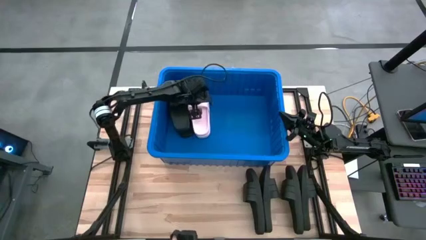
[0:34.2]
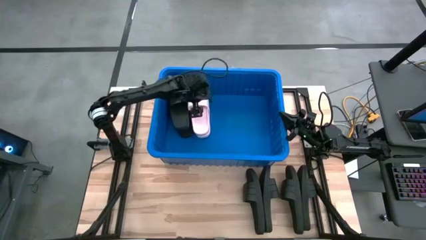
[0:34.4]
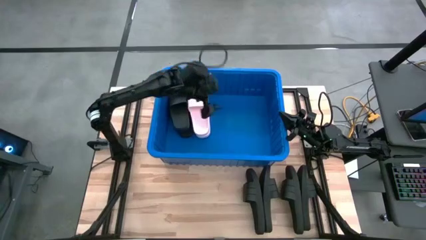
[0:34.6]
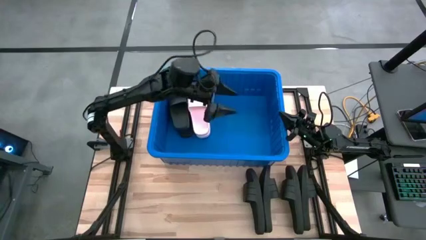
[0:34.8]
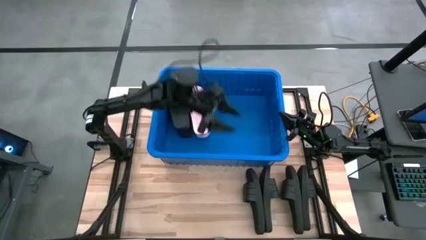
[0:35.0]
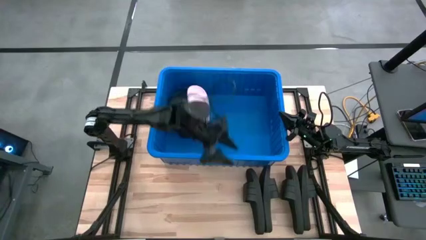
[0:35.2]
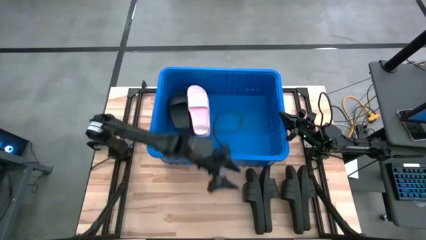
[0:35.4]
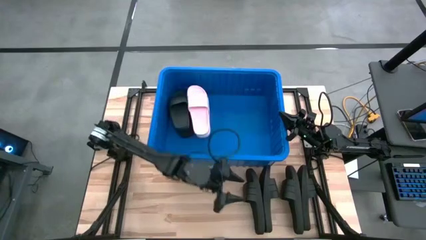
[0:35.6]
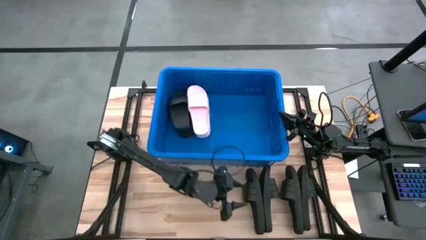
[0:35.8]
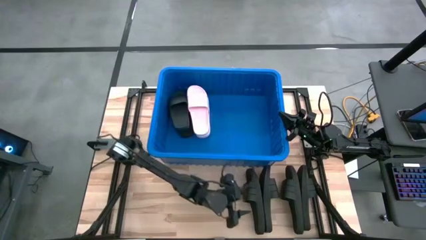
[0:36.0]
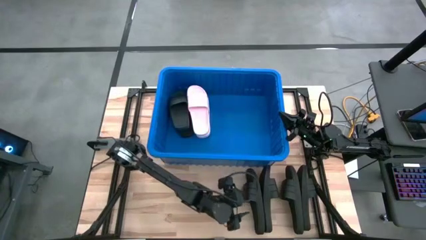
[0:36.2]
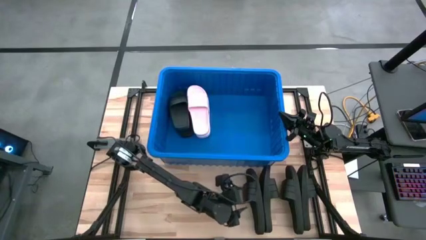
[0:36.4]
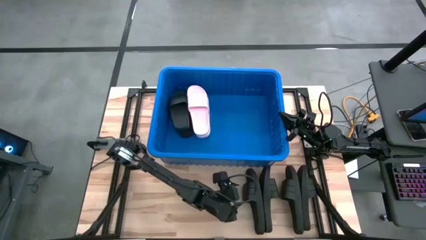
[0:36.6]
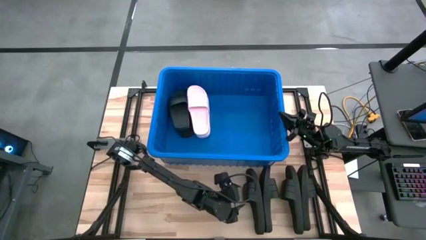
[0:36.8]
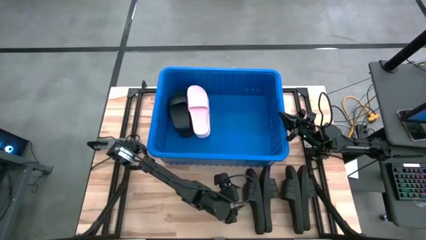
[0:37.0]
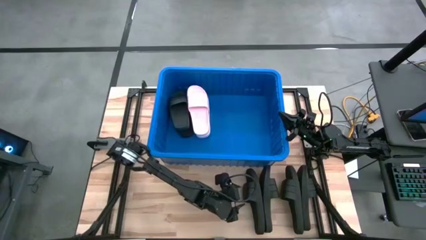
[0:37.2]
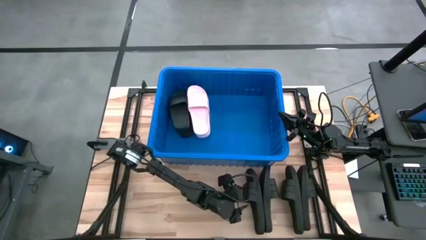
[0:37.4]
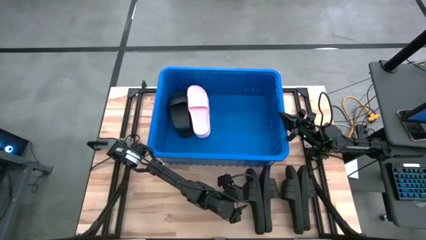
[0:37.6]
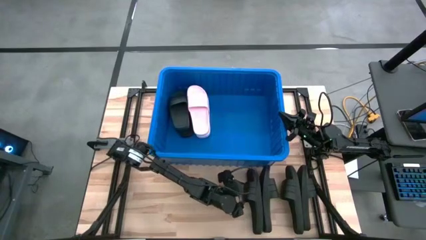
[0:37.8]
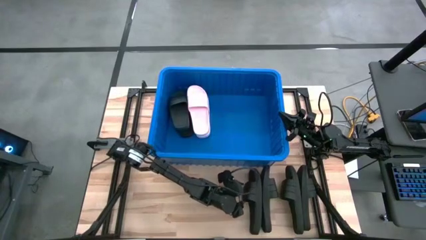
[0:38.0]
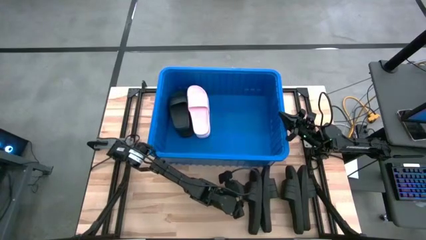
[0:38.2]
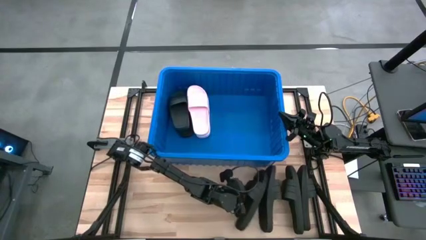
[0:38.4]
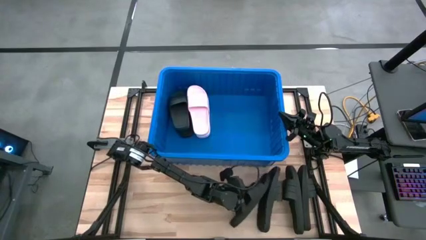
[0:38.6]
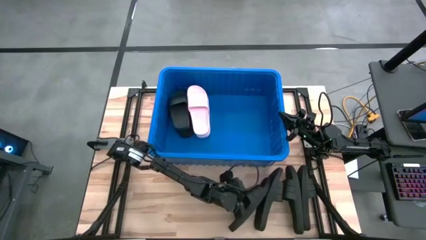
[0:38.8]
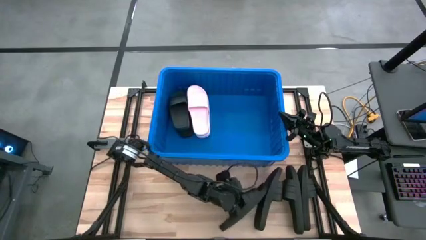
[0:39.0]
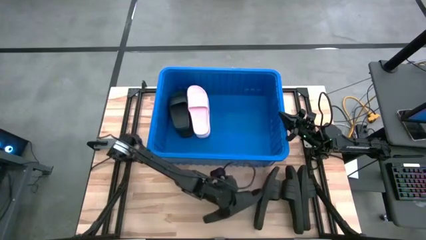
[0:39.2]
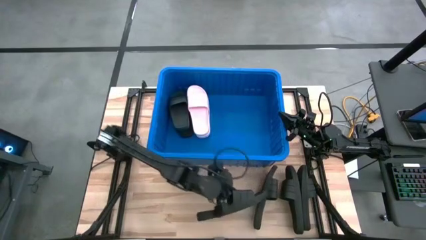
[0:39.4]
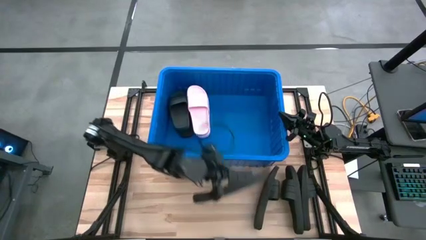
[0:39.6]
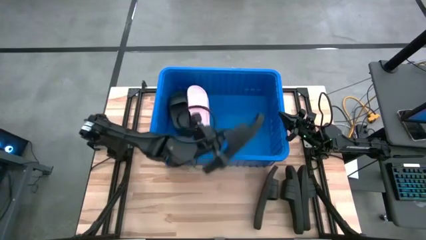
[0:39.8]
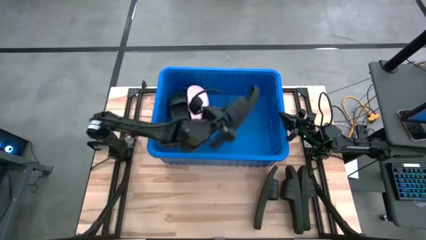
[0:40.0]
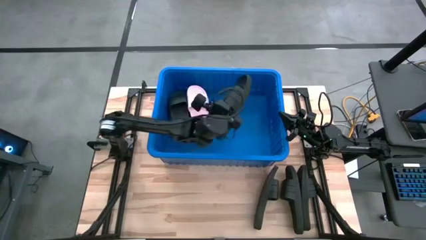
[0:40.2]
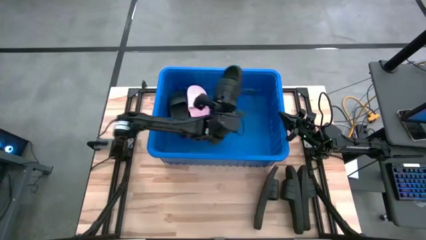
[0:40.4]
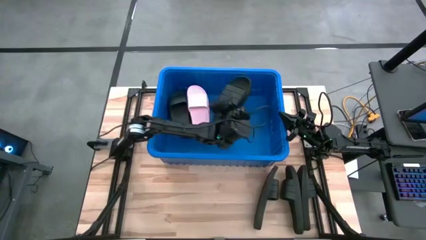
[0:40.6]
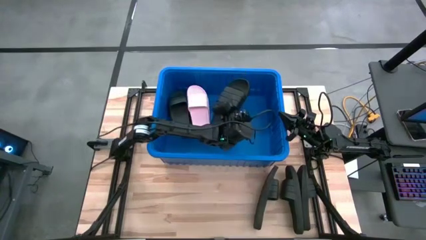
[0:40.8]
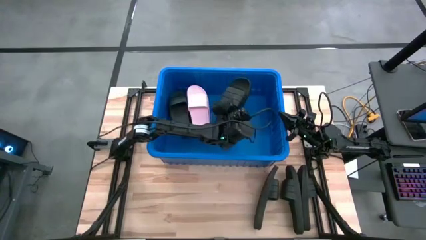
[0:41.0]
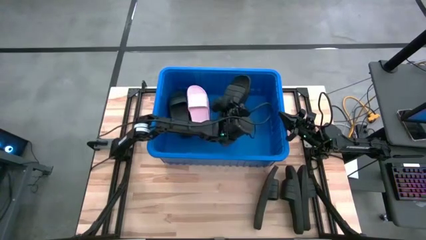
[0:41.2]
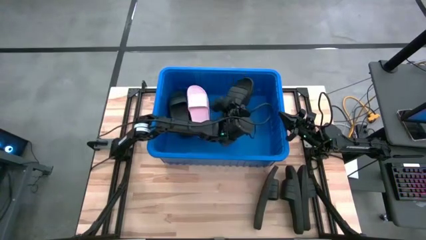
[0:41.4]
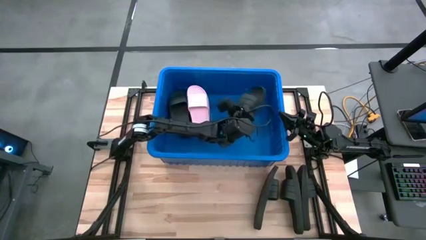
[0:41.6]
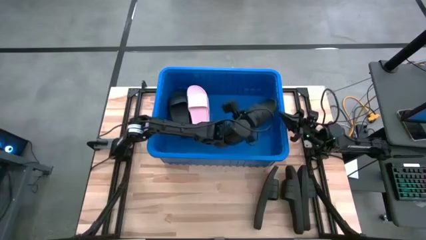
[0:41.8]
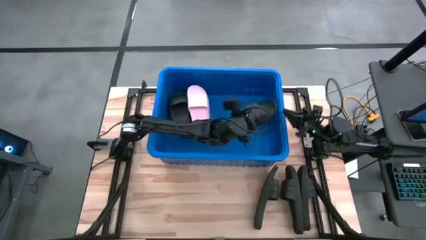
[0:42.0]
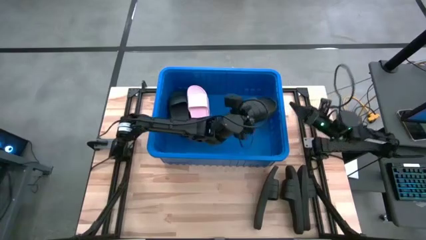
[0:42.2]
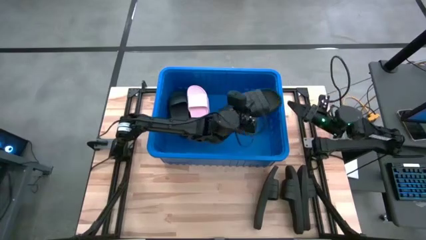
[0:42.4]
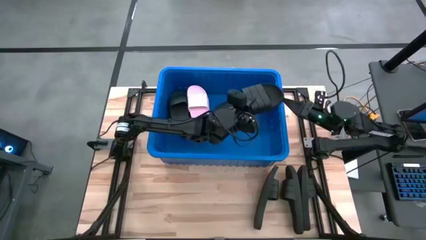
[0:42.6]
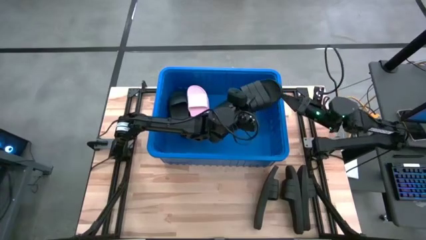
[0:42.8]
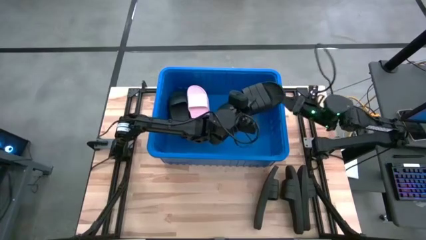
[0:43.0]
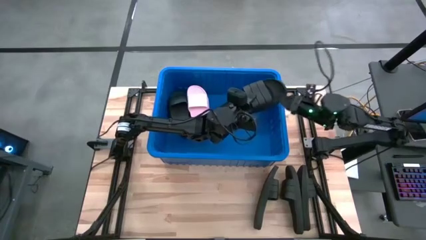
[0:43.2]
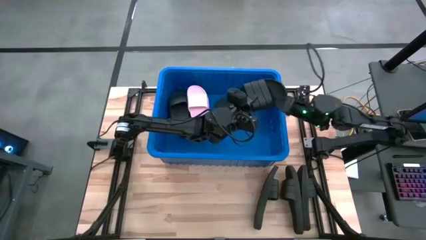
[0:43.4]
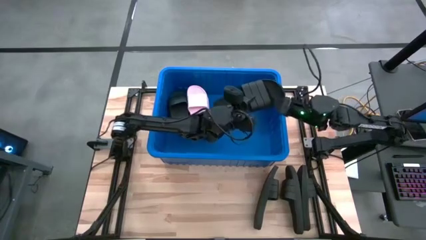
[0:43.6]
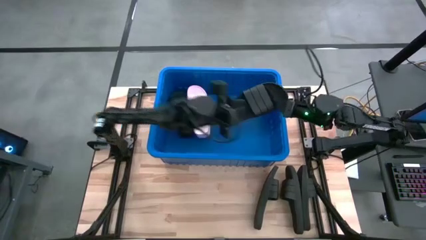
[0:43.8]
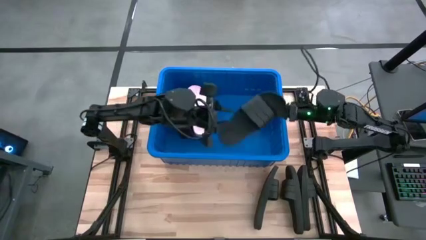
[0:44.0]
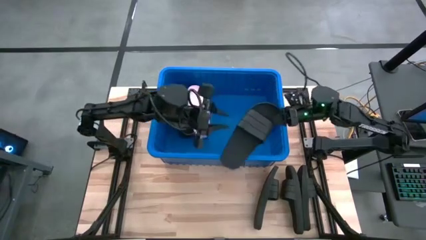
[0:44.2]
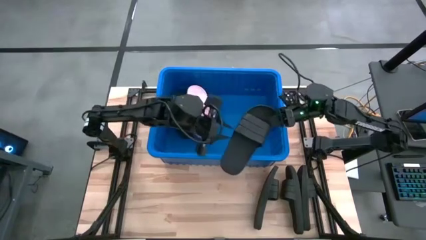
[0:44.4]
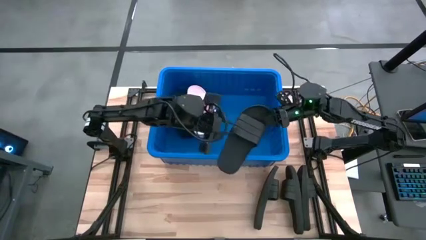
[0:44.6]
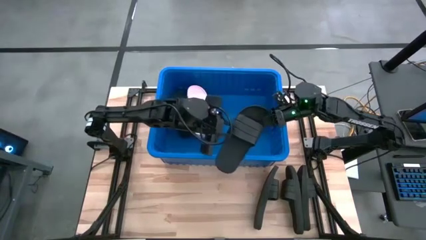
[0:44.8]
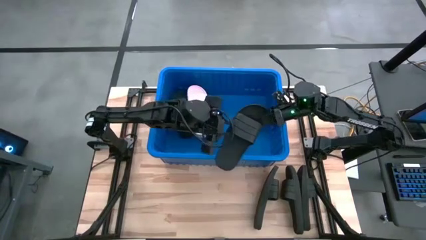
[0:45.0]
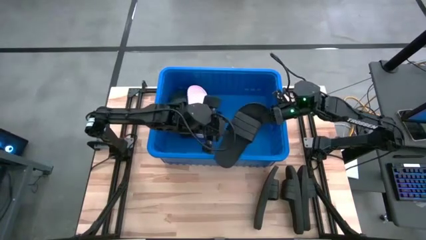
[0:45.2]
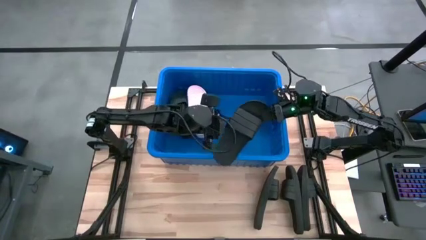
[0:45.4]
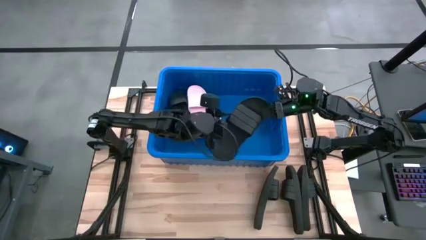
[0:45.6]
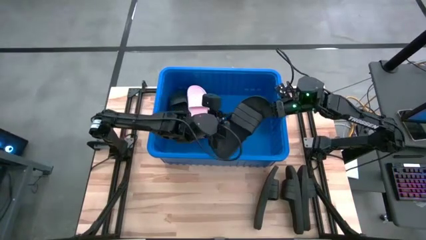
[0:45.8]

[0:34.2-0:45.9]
Task: Pick and place slides into bin
Put the black slide into the bin

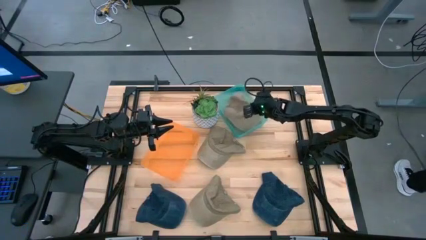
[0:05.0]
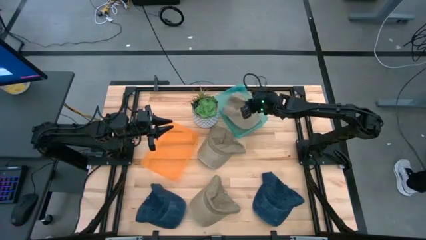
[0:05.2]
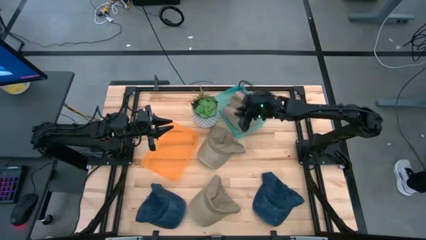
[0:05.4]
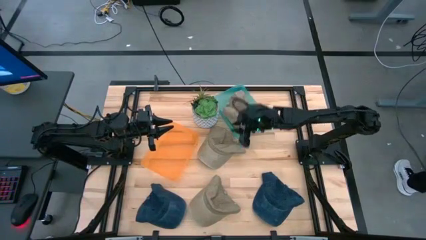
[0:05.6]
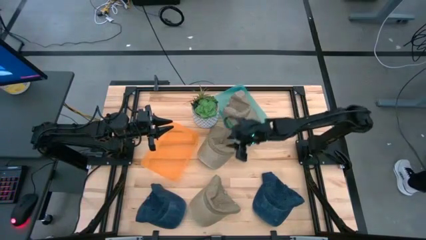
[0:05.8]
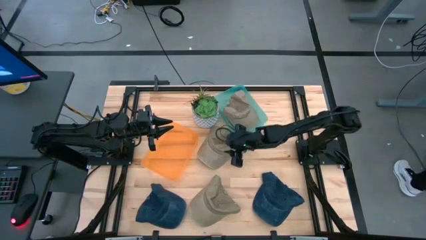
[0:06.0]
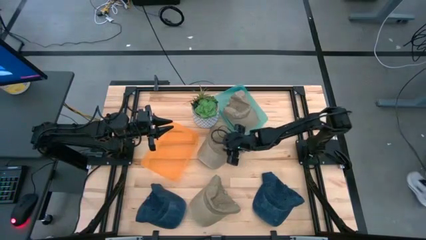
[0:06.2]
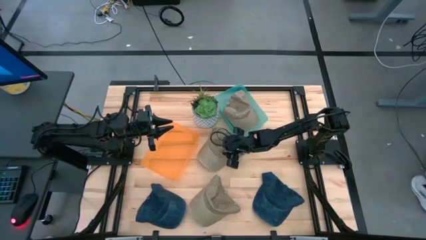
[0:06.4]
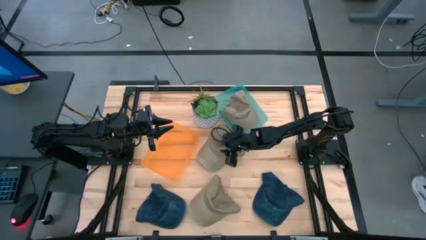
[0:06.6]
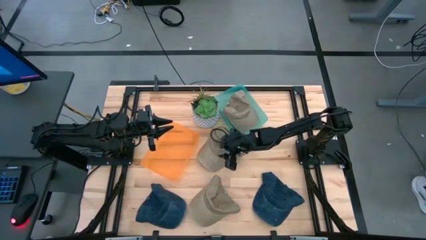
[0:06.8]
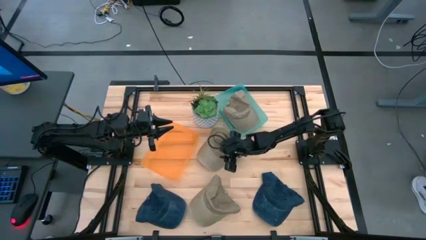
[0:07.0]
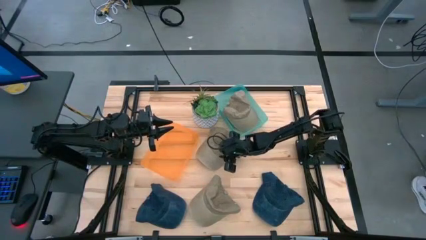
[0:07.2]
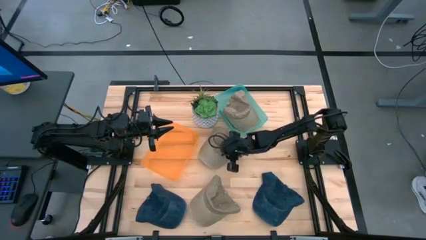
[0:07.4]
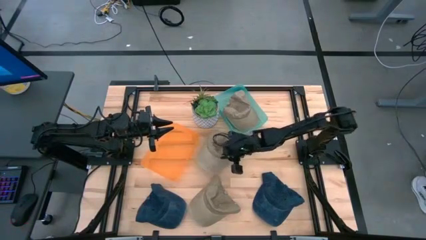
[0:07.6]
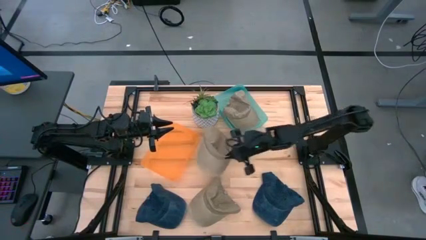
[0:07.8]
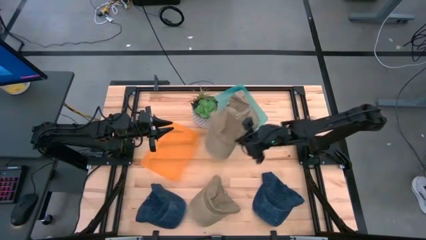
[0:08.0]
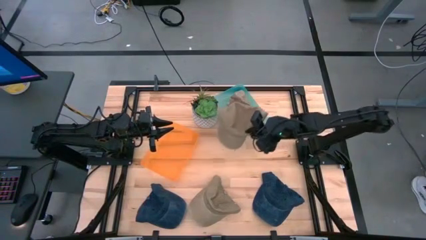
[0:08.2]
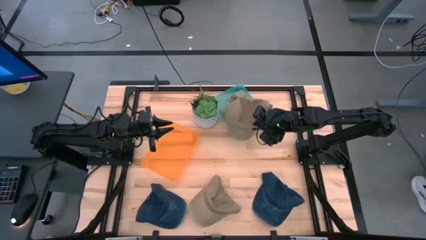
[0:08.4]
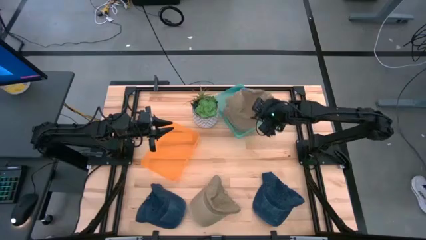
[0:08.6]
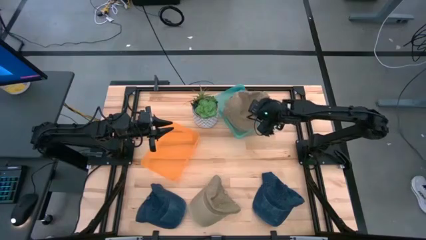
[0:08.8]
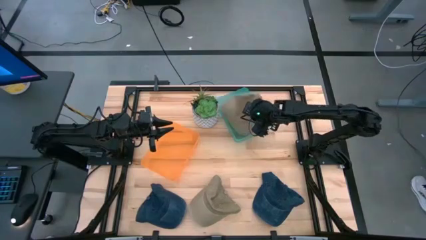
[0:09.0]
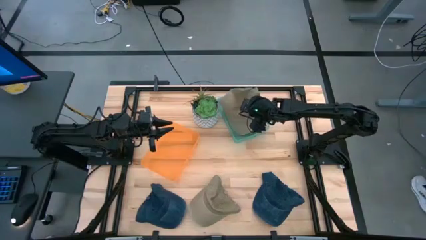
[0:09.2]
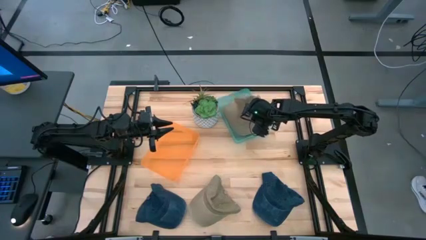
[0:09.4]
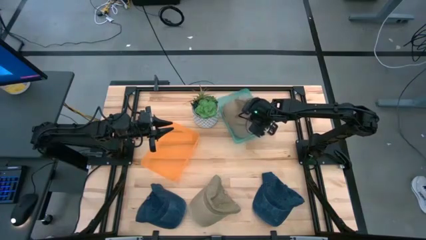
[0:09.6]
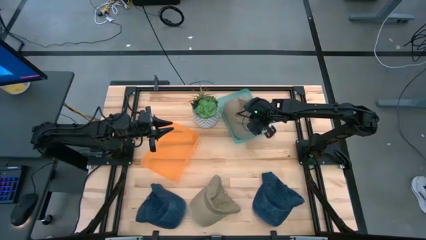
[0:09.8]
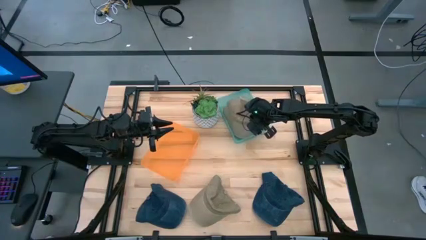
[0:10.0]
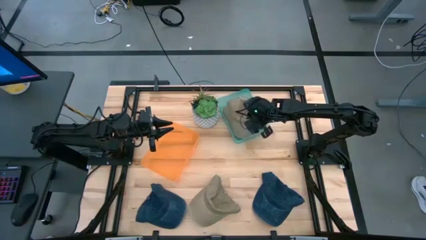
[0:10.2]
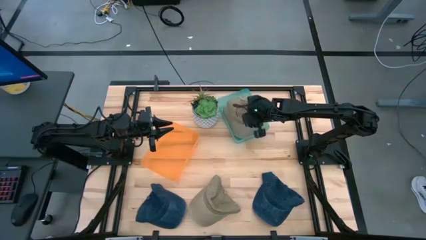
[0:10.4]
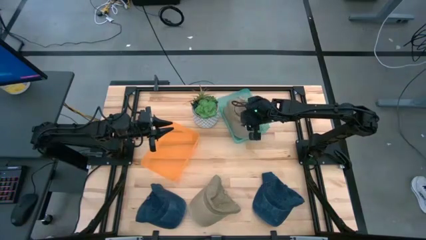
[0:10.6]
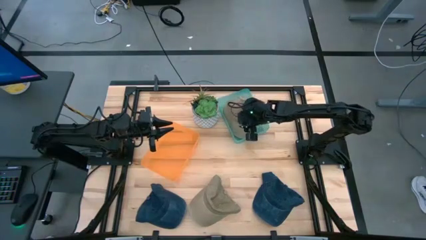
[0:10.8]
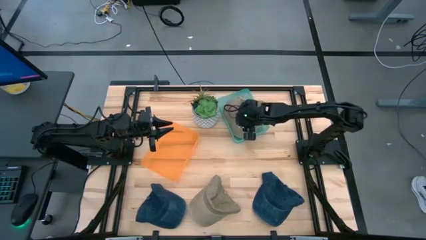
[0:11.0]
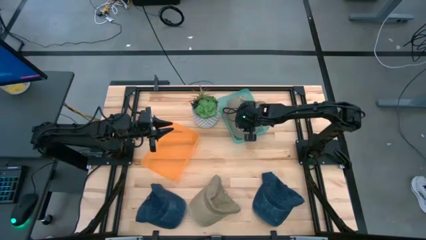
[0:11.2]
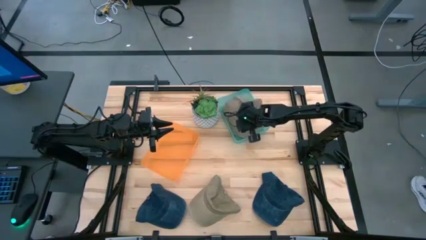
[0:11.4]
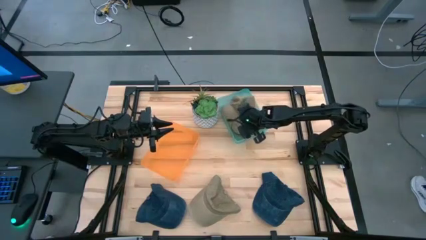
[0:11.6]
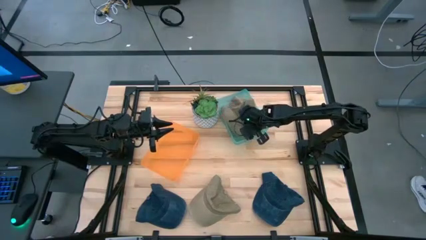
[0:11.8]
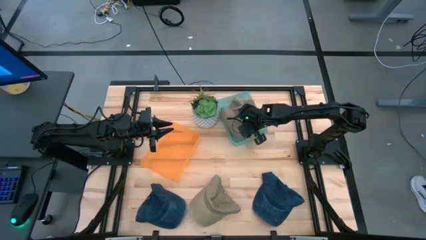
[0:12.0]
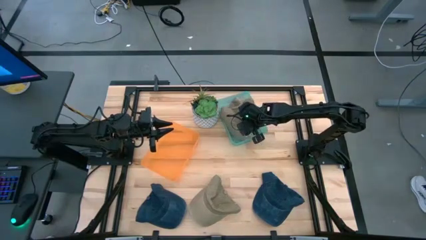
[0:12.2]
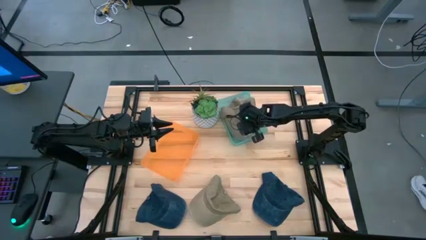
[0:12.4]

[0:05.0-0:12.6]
Task: Pick & Place hat
Put the top brown cap into the blue bin
